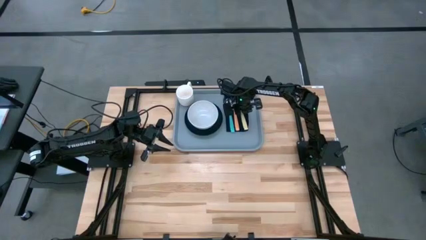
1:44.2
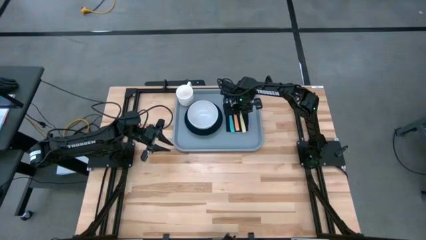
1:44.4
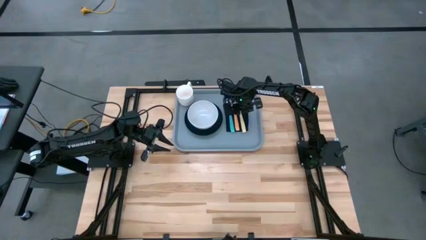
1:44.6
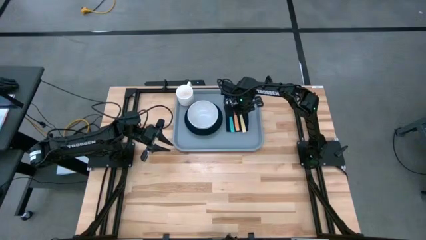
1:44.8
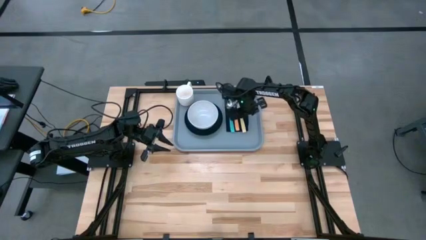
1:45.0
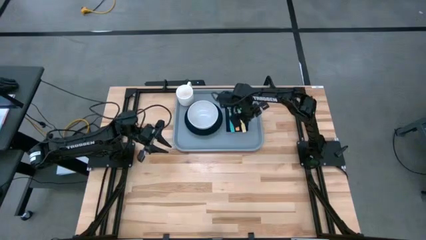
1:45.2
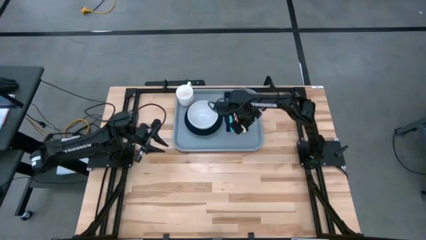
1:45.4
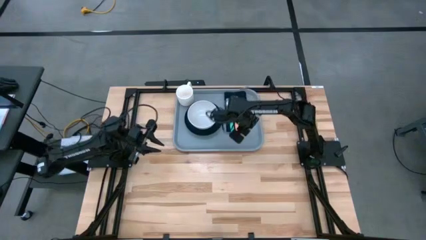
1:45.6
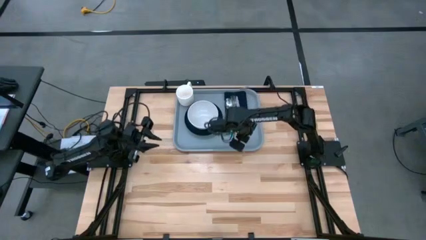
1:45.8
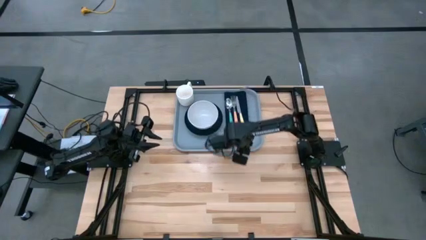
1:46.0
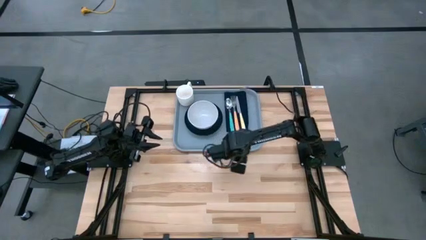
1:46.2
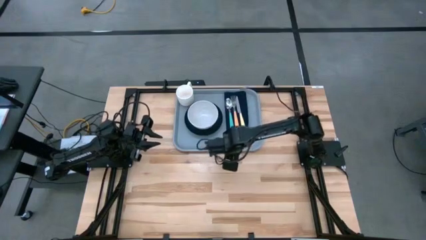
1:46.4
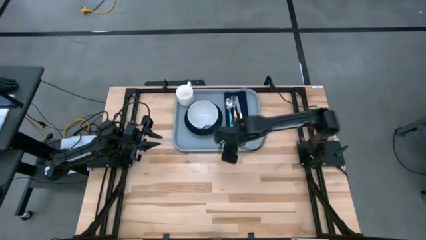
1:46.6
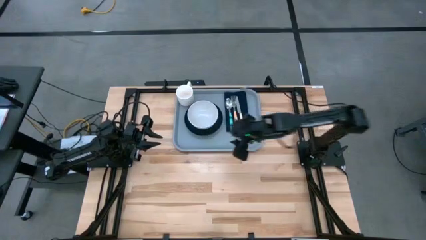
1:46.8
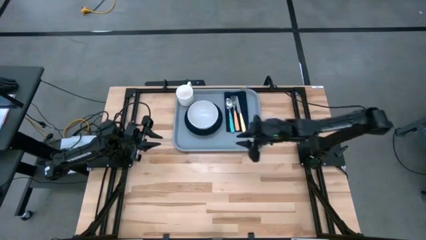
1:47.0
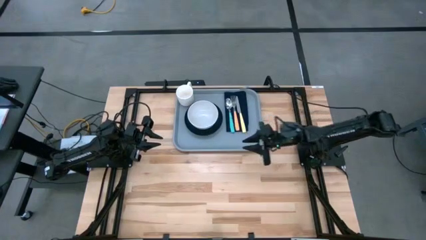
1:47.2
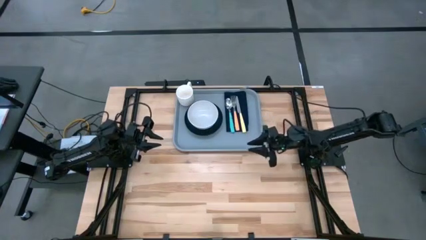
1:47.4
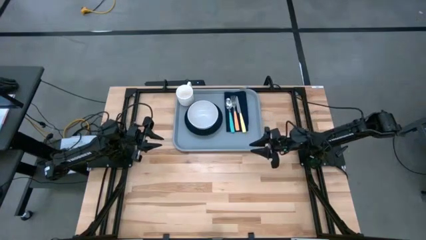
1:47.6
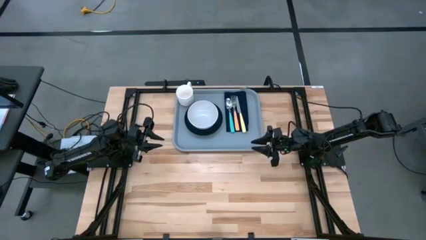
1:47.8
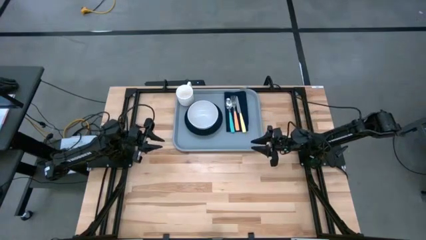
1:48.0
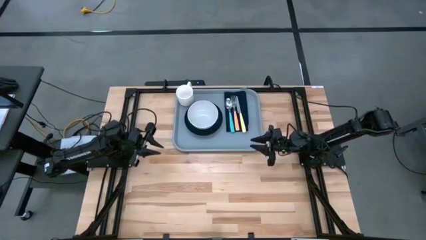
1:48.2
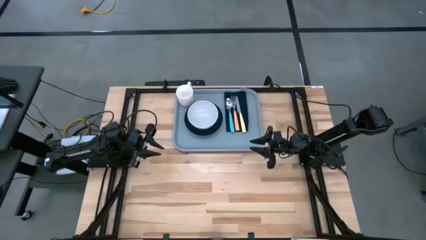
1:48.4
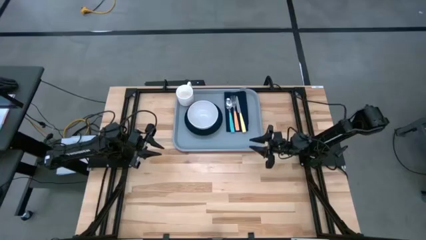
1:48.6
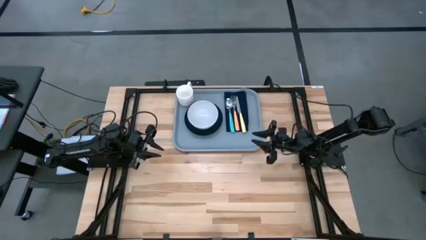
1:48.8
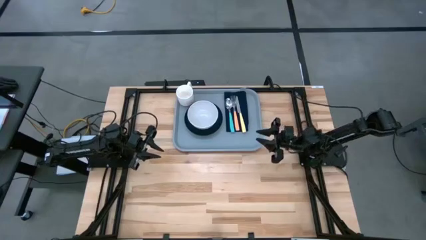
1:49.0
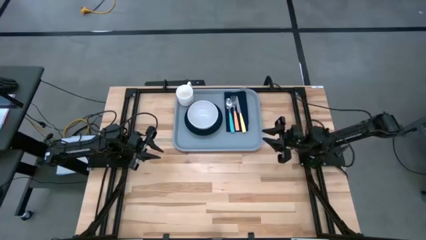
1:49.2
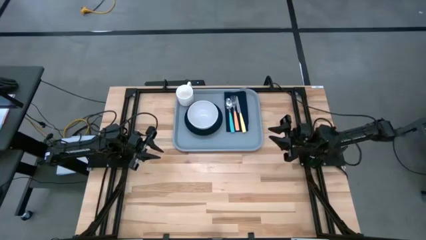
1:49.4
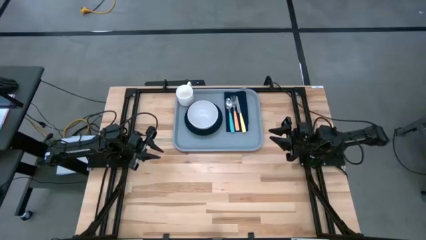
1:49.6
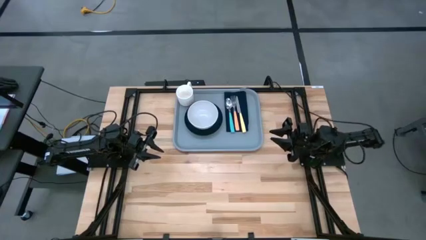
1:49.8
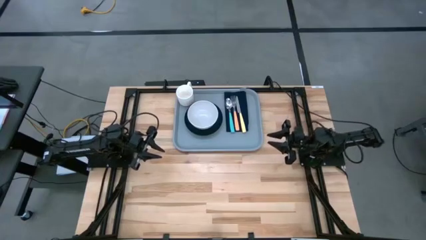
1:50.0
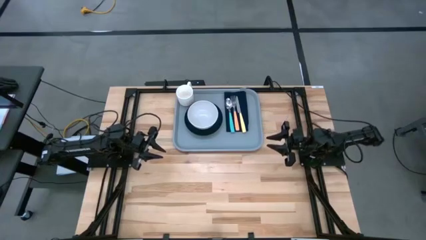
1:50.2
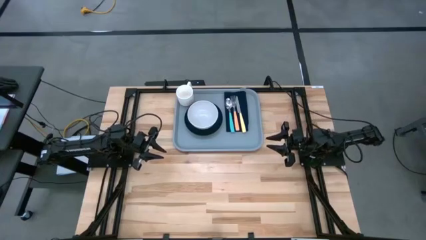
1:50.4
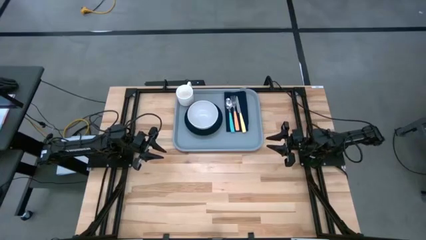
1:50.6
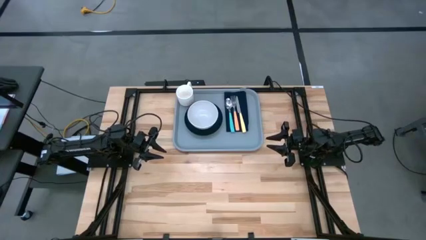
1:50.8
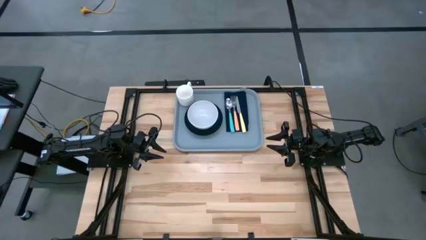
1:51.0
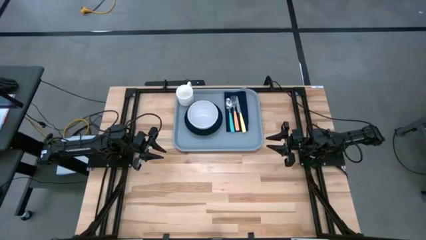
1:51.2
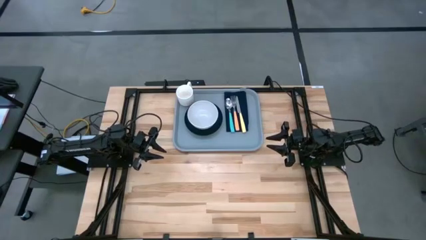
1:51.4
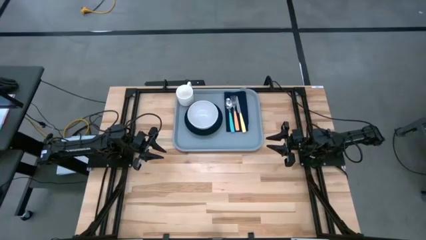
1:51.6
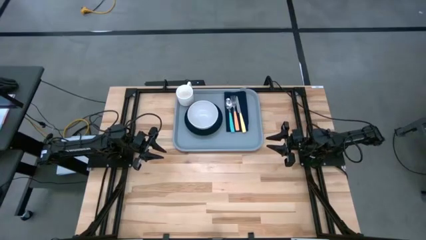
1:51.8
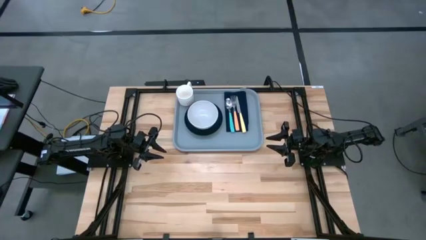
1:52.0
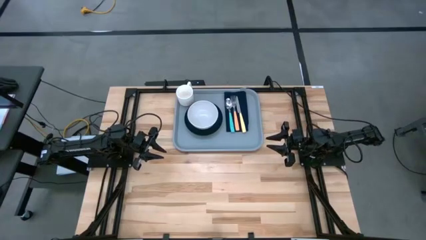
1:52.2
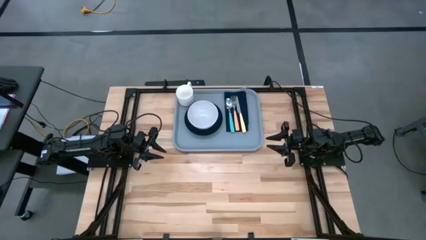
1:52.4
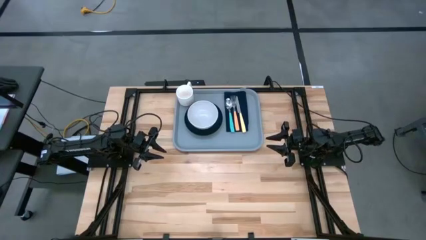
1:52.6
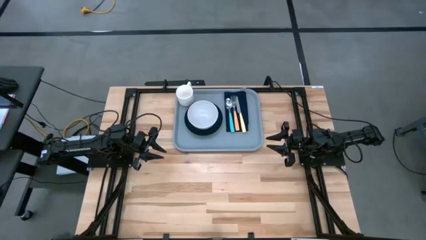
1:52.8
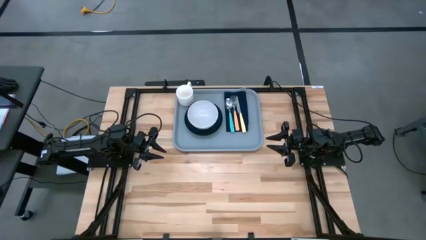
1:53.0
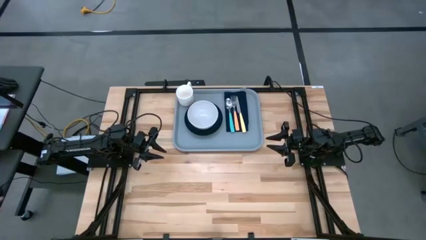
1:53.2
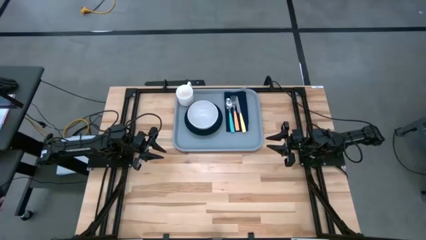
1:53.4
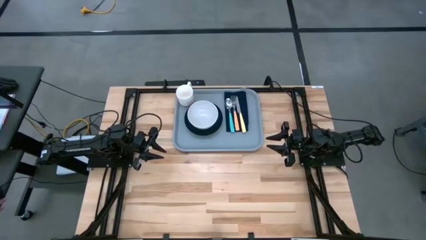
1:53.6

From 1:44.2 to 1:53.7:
Task: Set up tray
Return to Home Position
